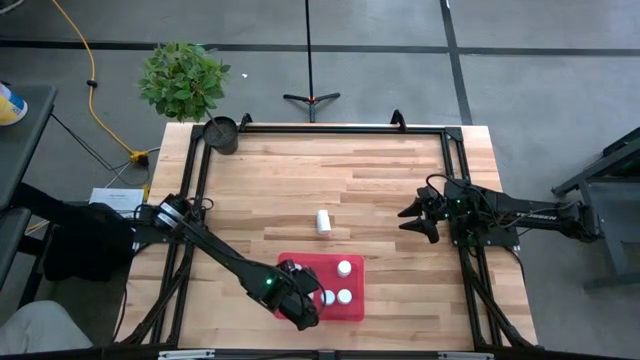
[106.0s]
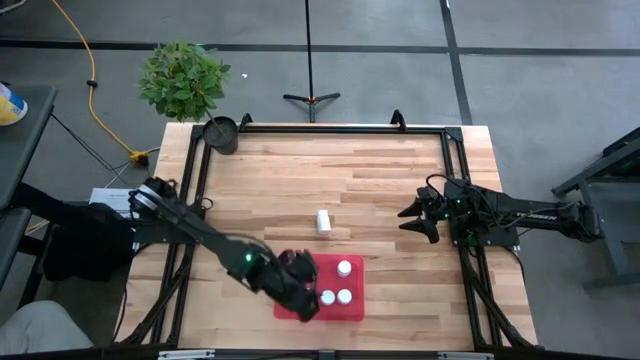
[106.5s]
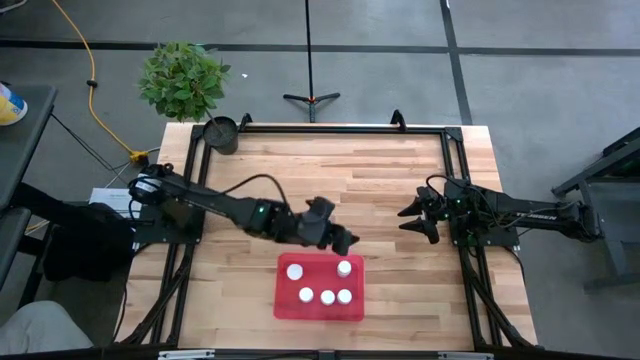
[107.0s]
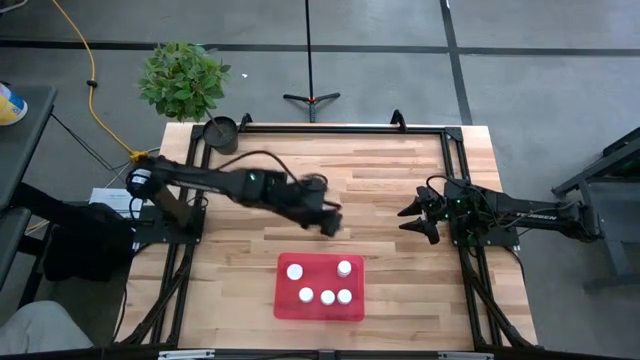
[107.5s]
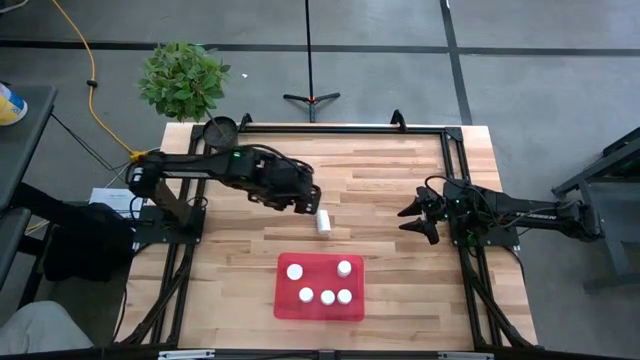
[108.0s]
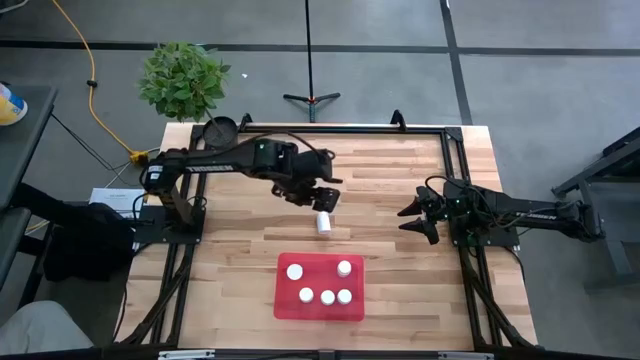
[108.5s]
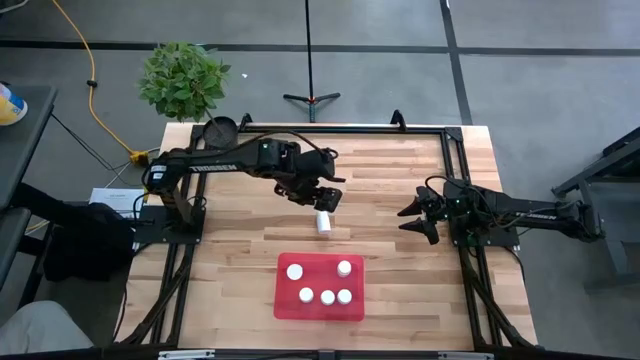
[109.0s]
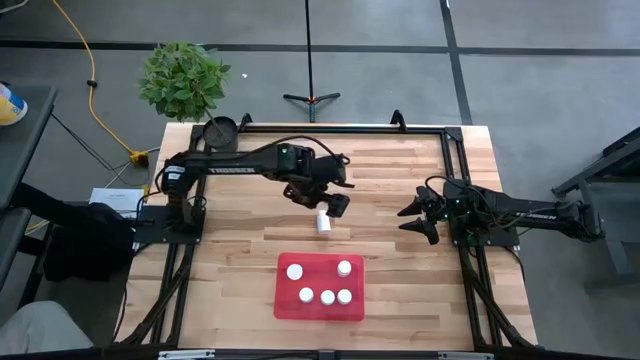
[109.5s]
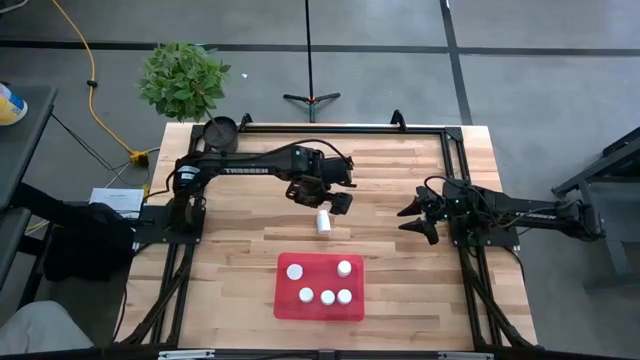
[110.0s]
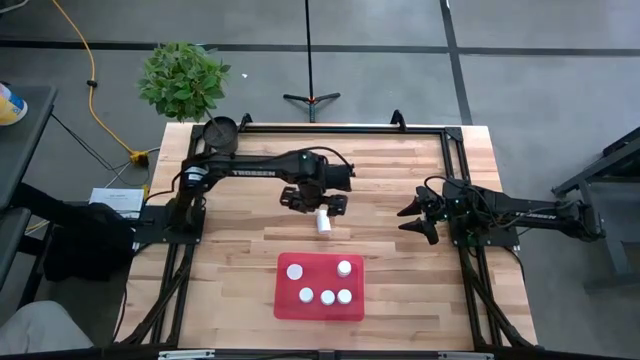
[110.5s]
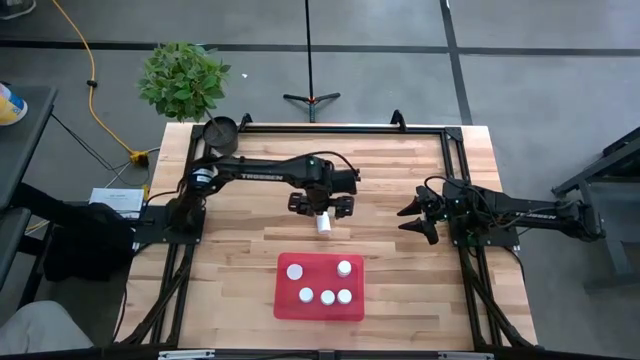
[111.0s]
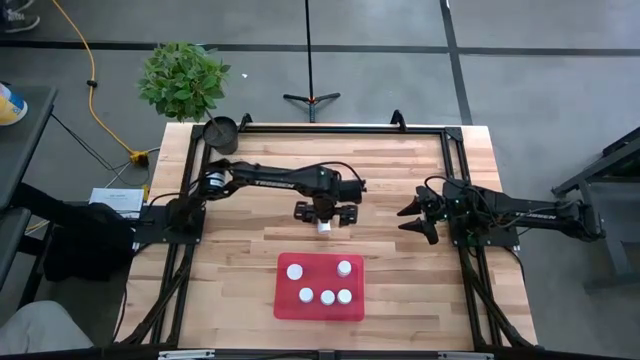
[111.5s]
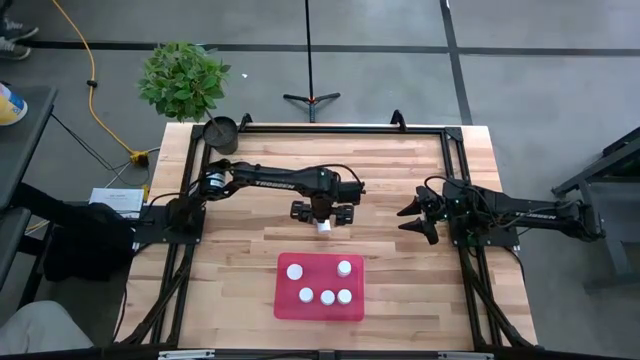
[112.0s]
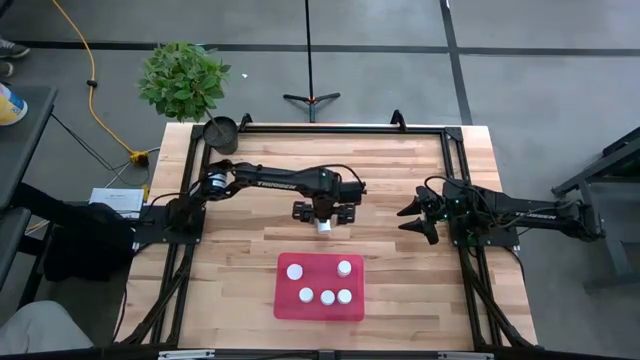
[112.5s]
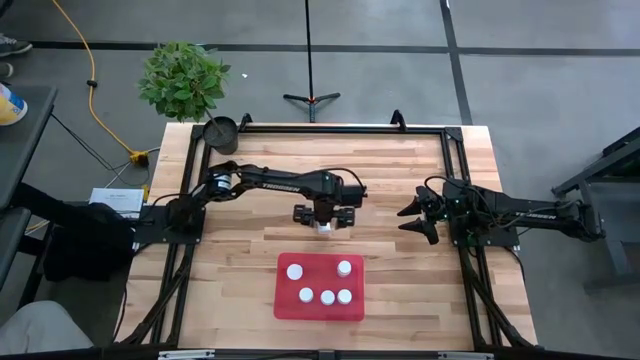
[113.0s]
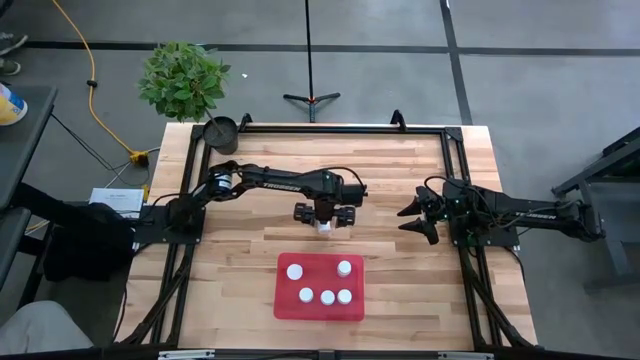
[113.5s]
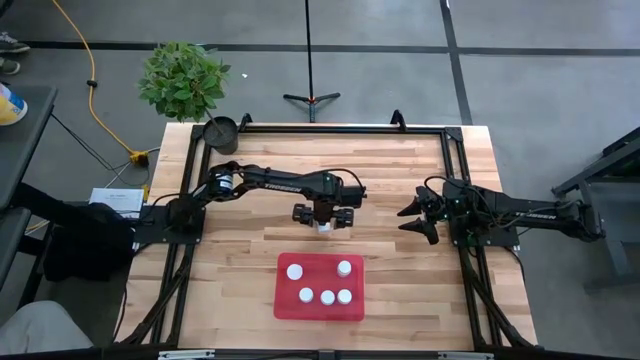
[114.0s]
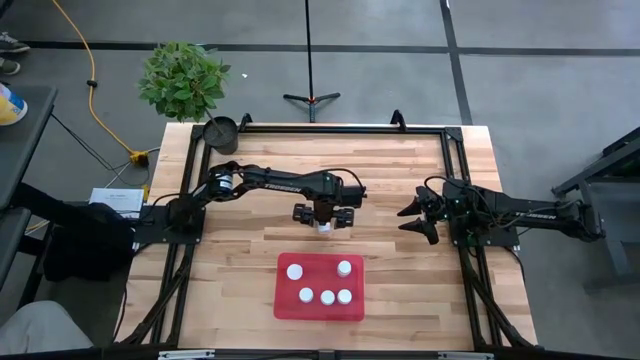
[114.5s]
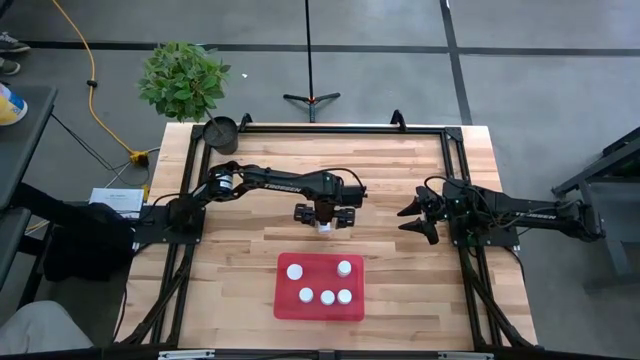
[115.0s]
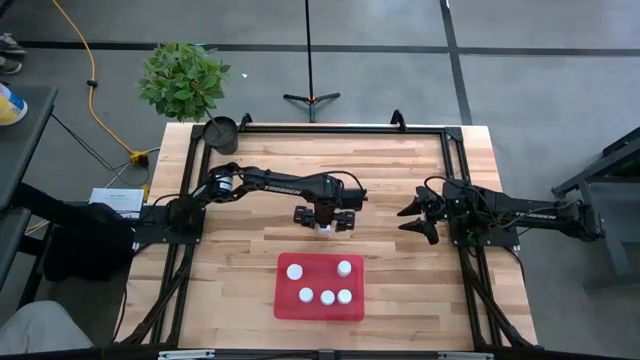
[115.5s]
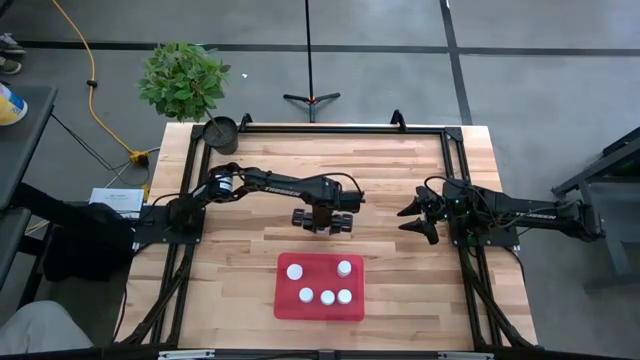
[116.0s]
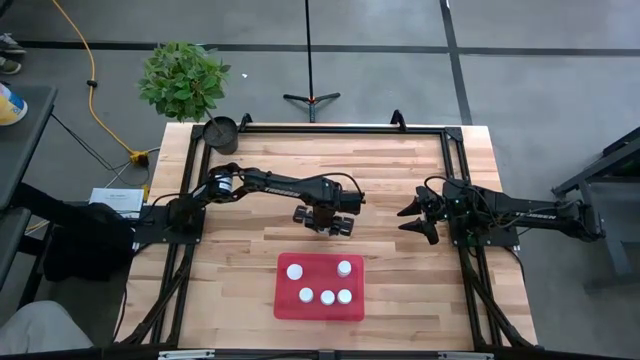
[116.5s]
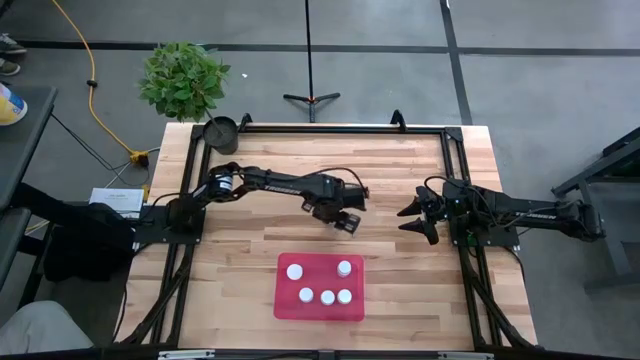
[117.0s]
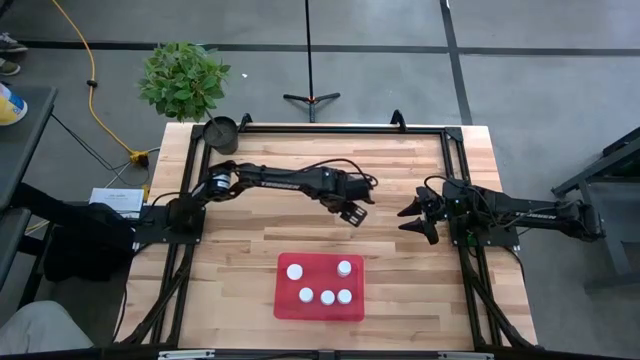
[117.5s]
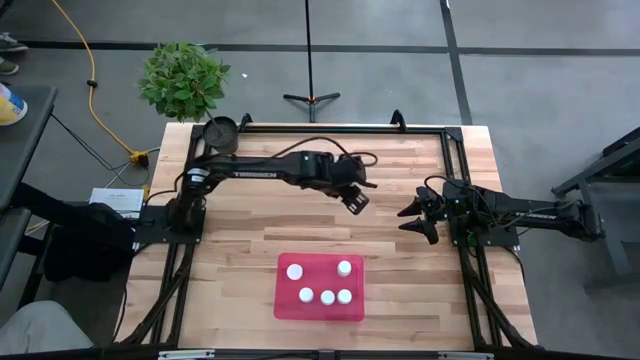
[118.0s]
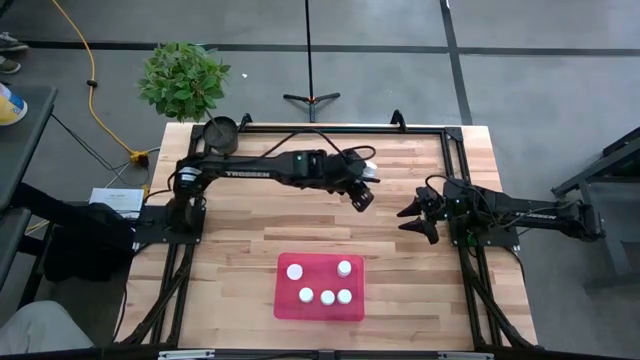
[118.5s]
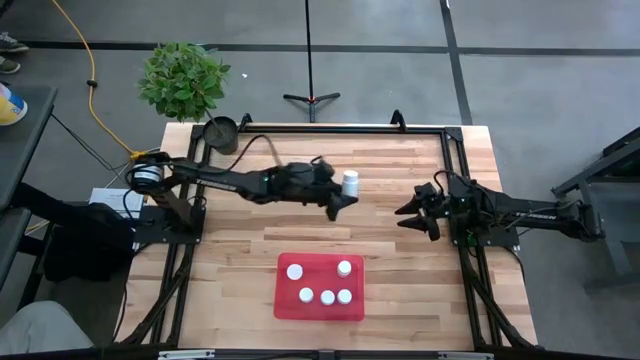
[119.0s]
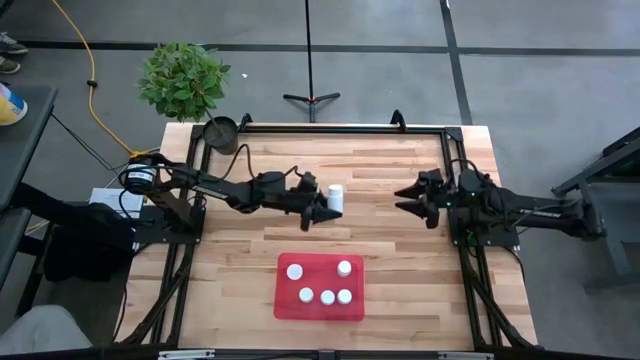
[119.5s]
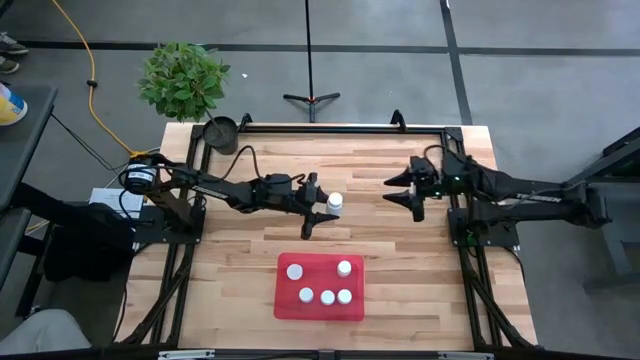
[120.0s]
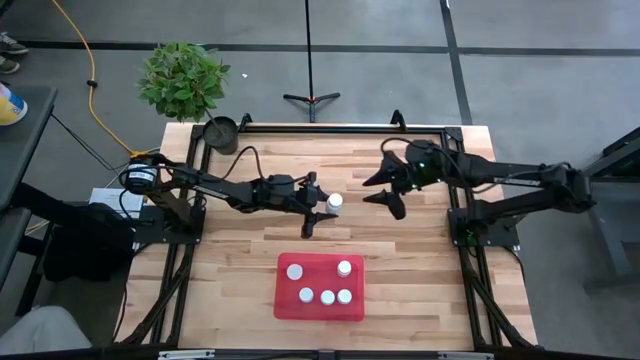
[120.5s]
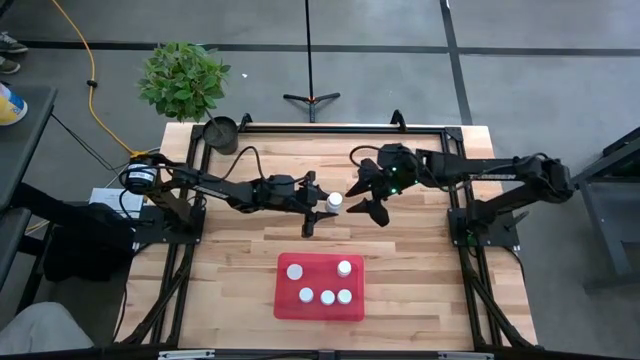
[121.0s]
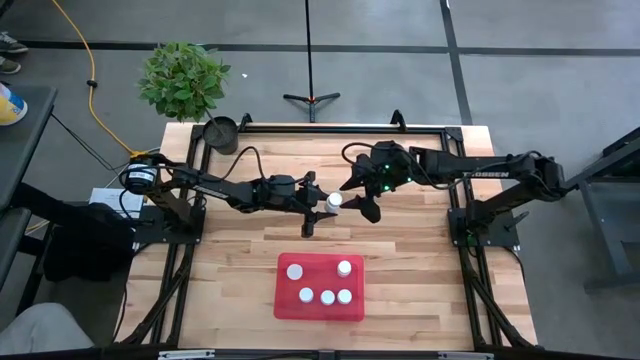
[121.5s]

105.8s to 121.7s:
Task: Pick and place pill bottles into a basket
Put the white pill bottle into the red bin

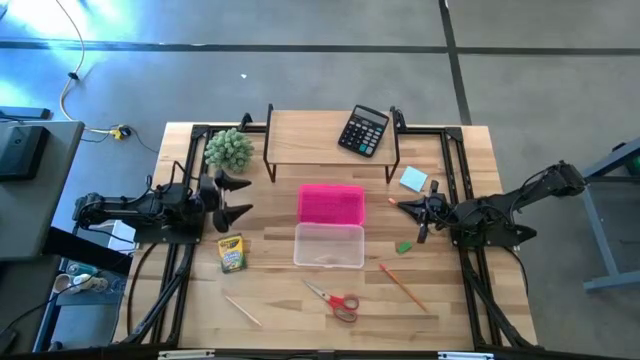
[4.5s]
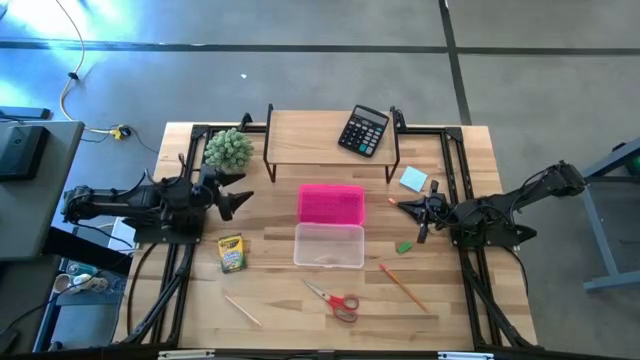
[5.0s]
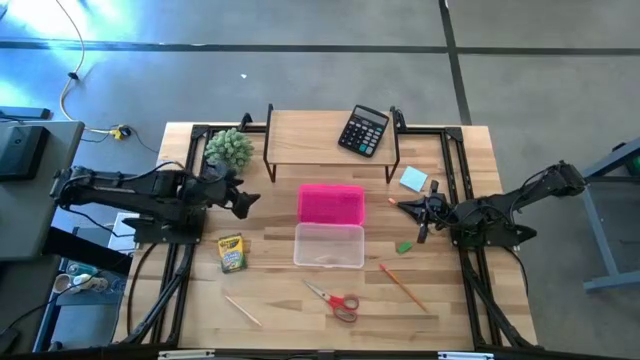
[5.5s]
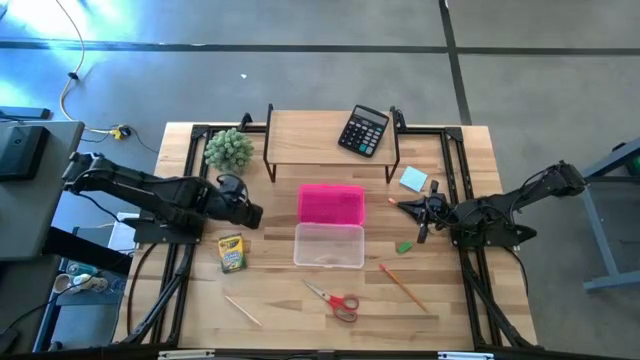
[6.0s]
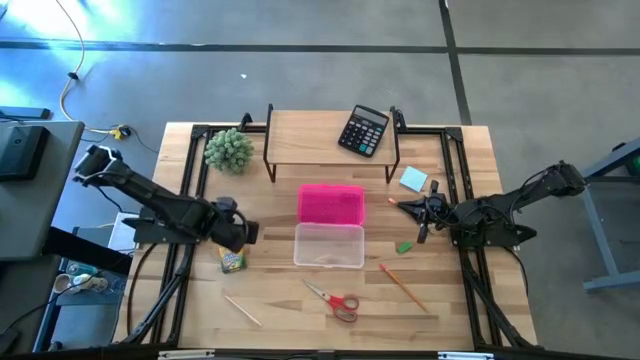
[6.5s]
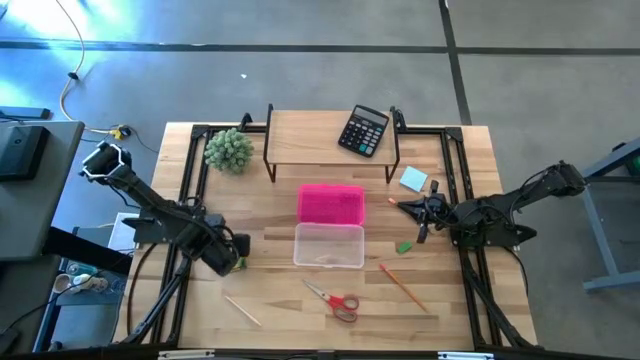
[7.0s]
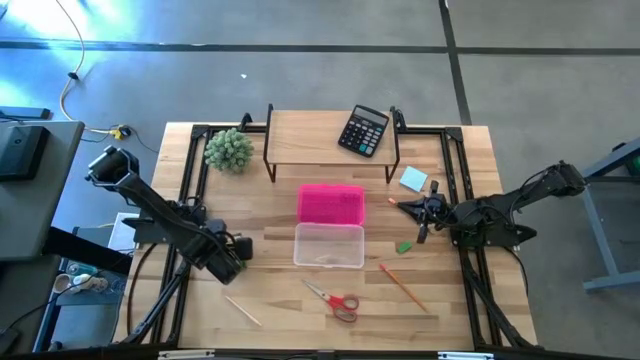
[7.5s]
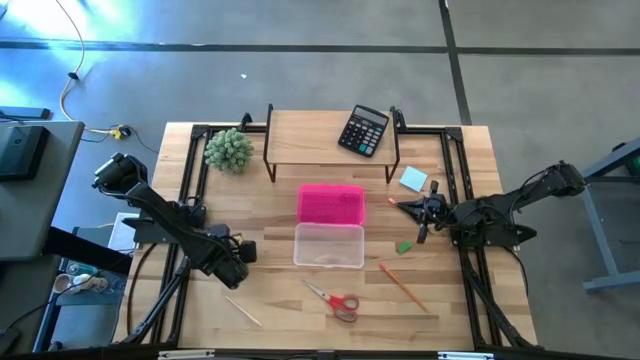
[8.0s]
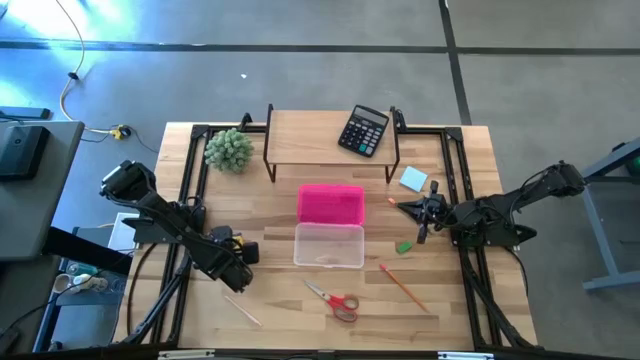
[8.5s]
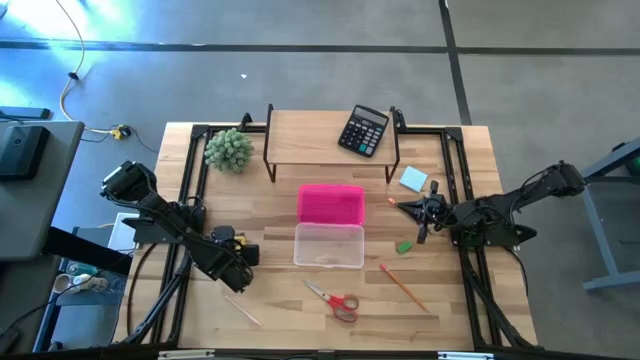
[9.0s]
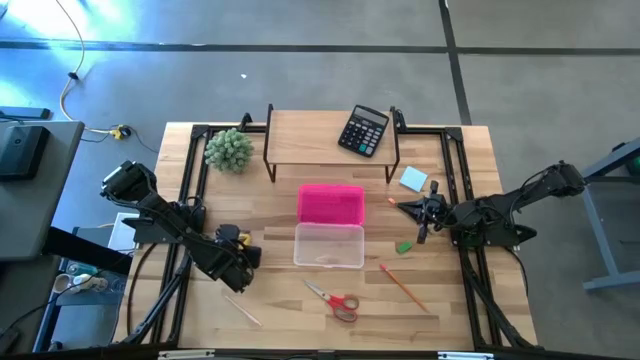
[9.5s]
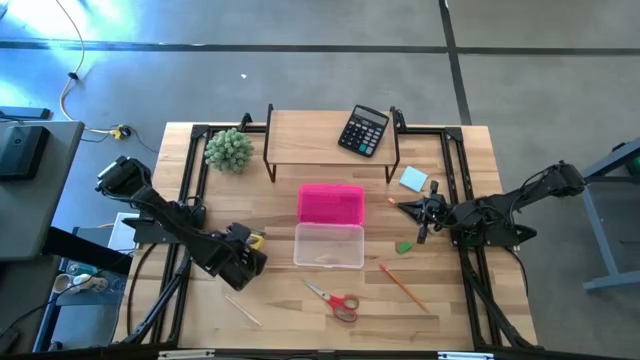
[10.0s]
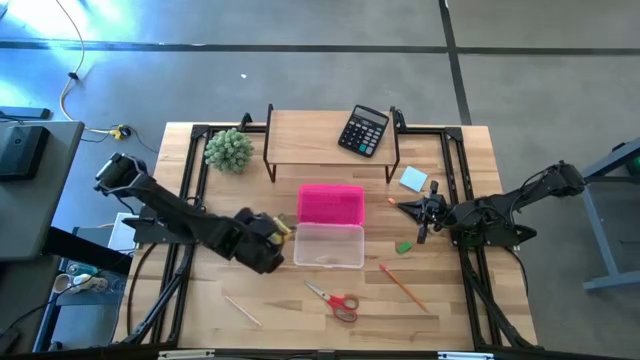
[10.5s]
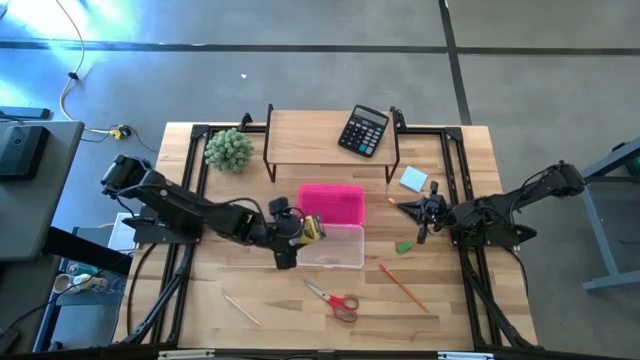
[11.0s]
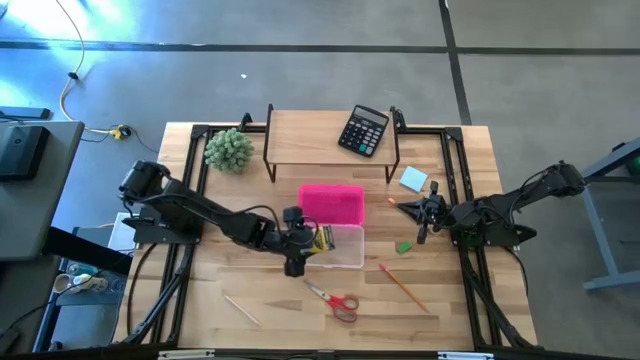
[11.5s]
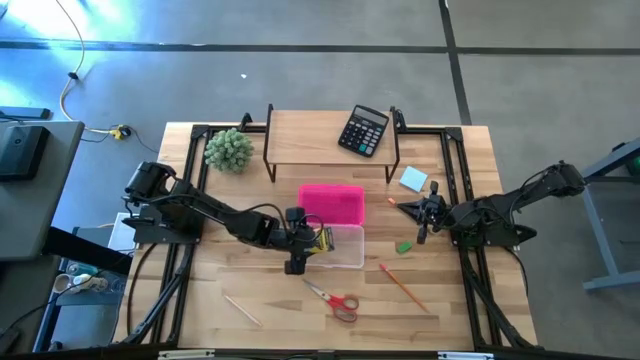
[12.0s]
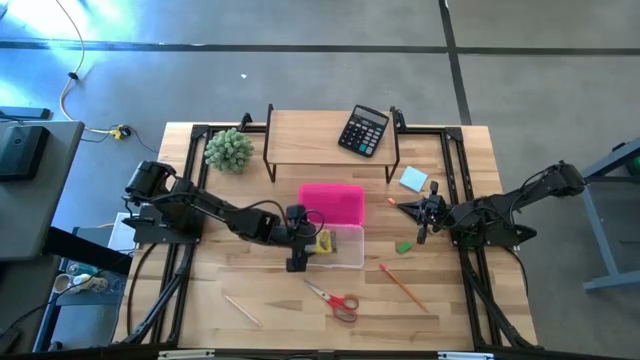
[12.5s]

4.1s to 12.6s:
Task: Pack school essentials
Put the yellow crayon box into the pink supply box
